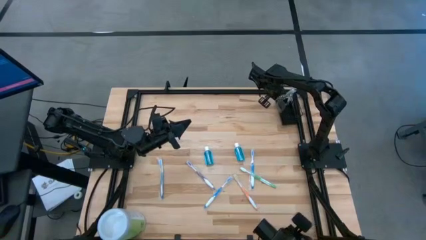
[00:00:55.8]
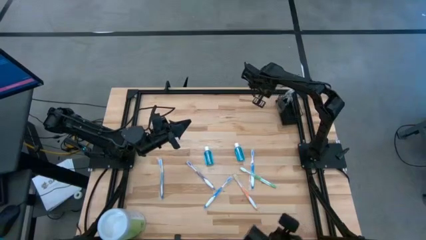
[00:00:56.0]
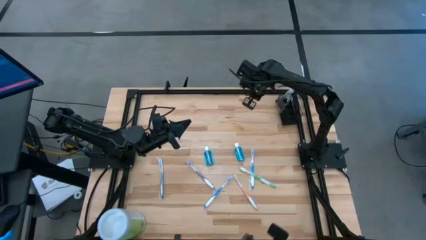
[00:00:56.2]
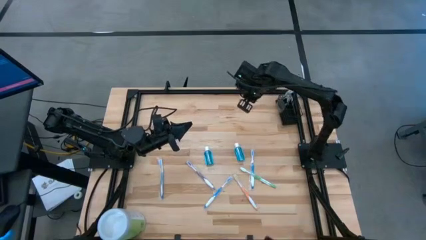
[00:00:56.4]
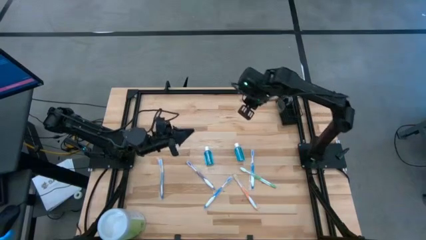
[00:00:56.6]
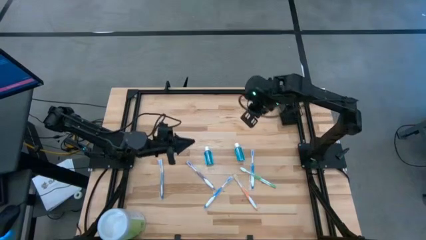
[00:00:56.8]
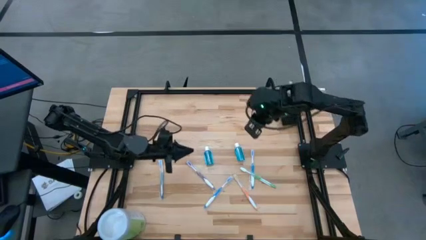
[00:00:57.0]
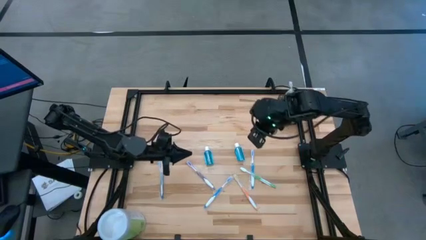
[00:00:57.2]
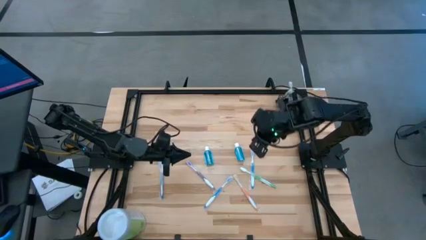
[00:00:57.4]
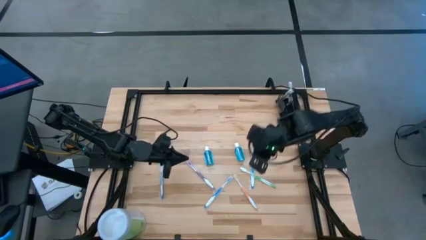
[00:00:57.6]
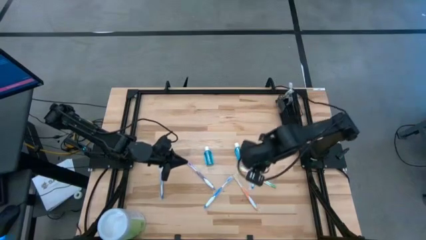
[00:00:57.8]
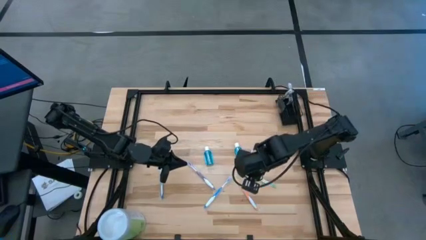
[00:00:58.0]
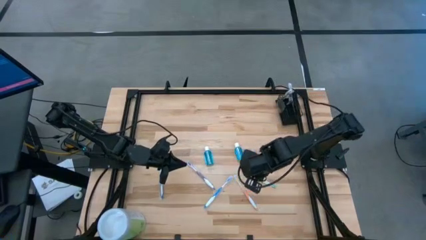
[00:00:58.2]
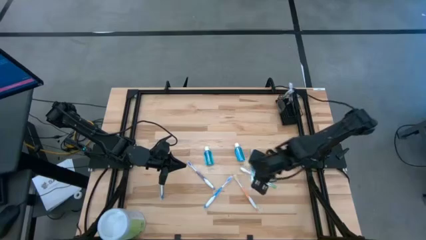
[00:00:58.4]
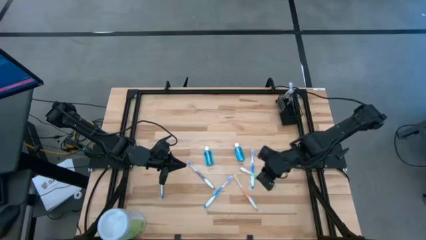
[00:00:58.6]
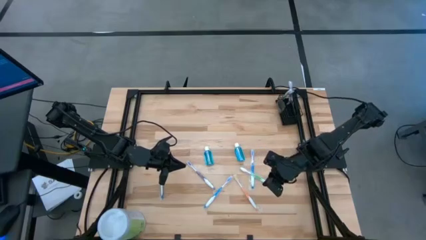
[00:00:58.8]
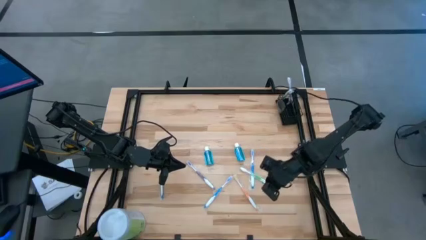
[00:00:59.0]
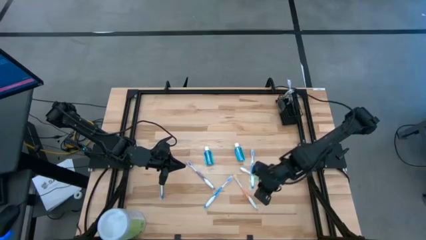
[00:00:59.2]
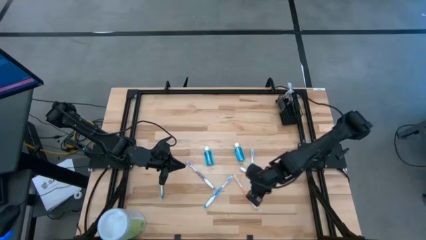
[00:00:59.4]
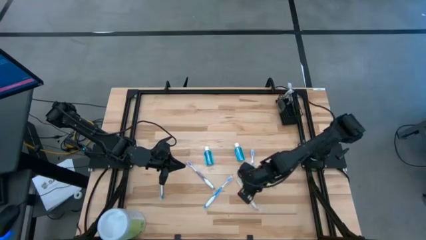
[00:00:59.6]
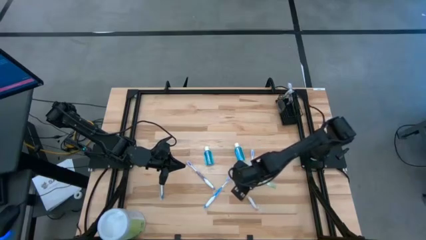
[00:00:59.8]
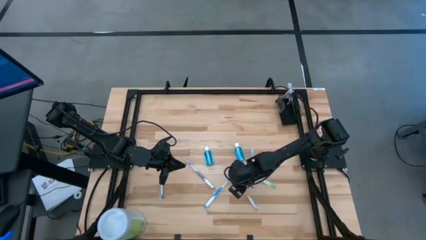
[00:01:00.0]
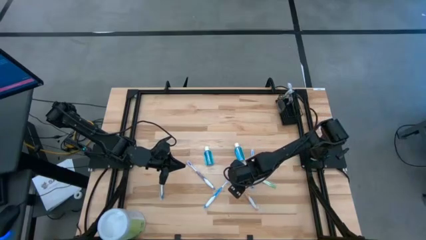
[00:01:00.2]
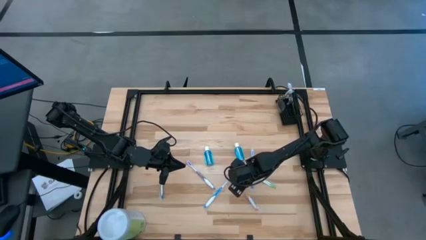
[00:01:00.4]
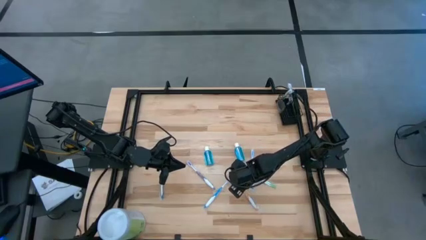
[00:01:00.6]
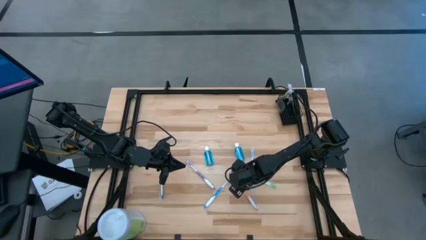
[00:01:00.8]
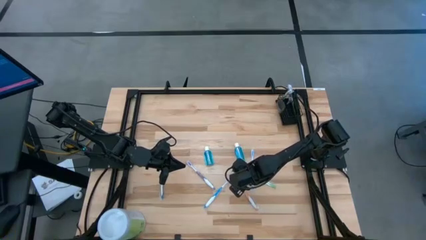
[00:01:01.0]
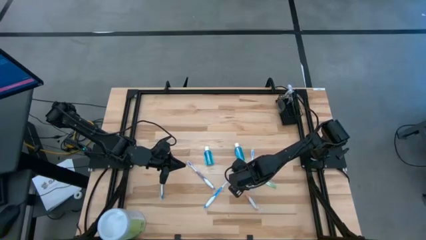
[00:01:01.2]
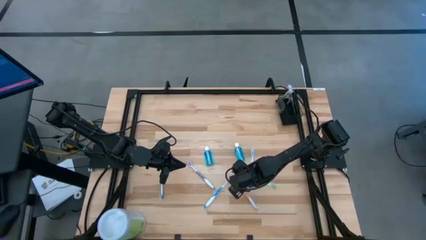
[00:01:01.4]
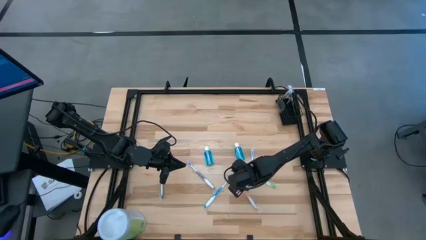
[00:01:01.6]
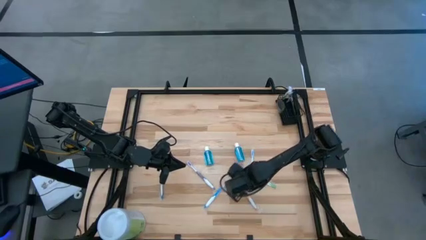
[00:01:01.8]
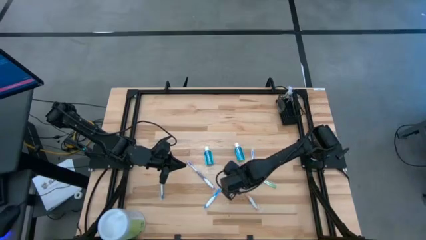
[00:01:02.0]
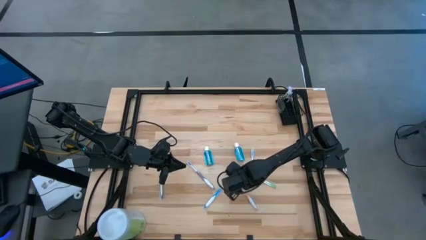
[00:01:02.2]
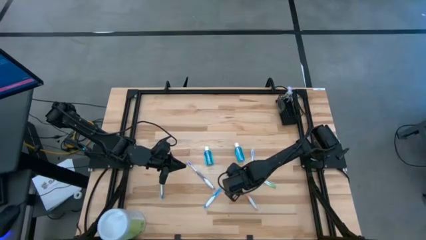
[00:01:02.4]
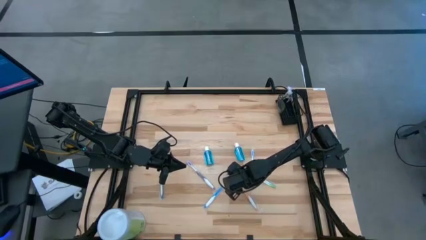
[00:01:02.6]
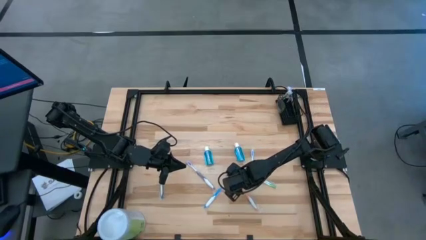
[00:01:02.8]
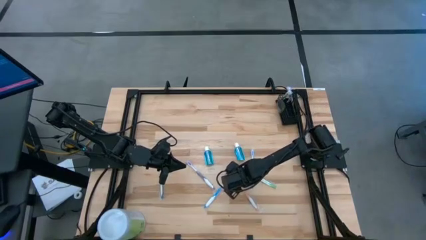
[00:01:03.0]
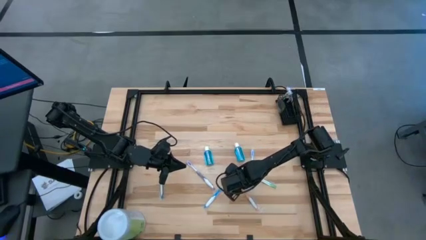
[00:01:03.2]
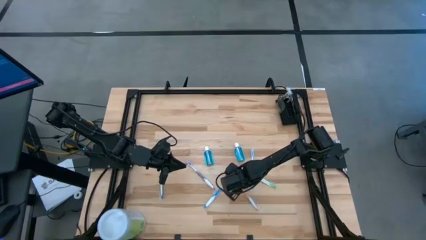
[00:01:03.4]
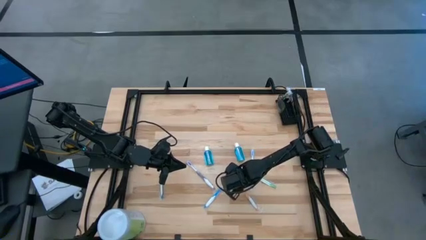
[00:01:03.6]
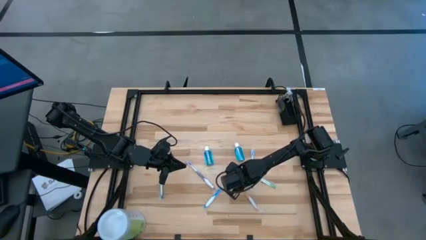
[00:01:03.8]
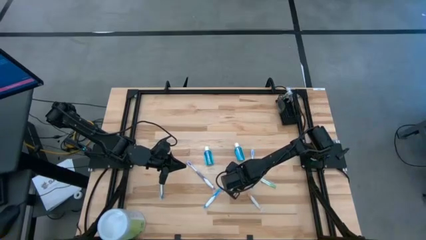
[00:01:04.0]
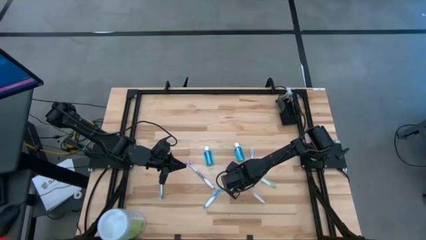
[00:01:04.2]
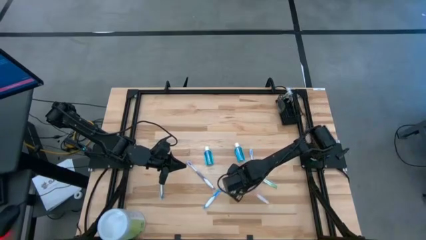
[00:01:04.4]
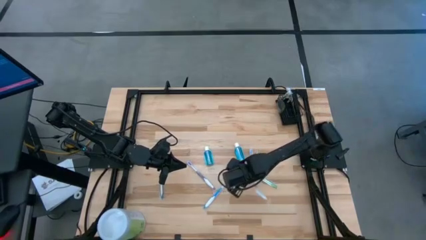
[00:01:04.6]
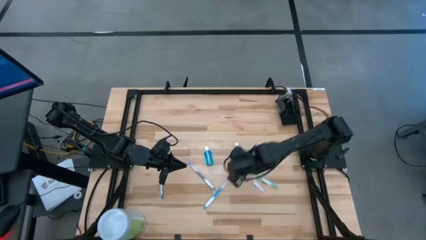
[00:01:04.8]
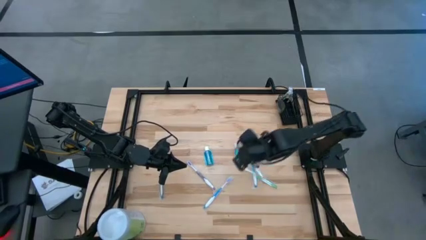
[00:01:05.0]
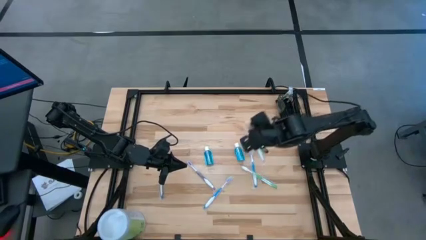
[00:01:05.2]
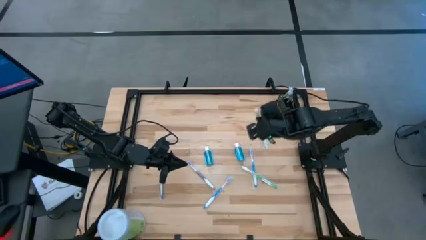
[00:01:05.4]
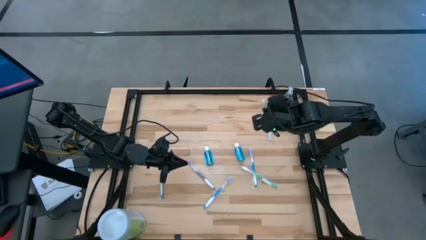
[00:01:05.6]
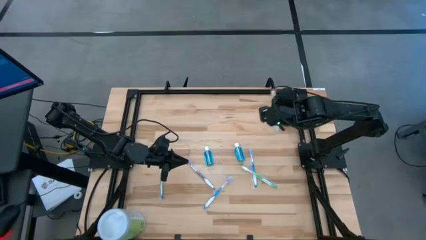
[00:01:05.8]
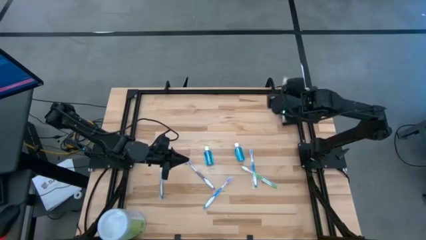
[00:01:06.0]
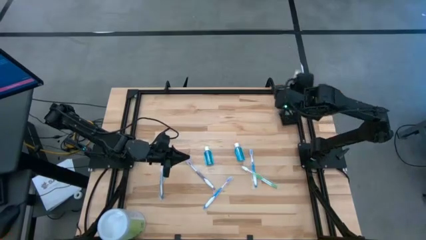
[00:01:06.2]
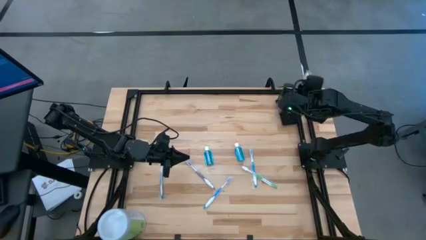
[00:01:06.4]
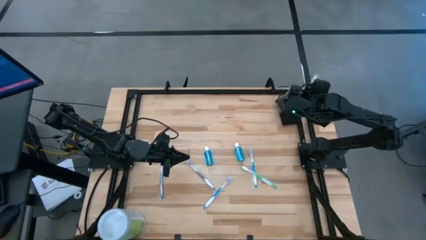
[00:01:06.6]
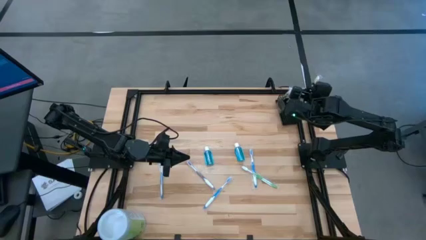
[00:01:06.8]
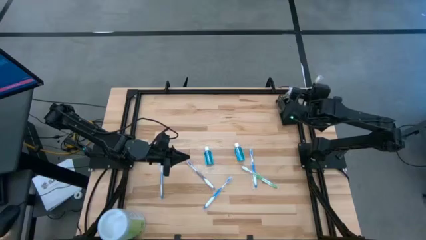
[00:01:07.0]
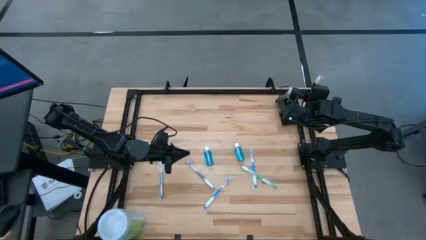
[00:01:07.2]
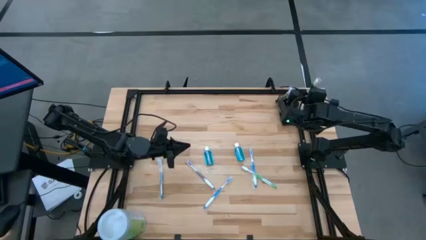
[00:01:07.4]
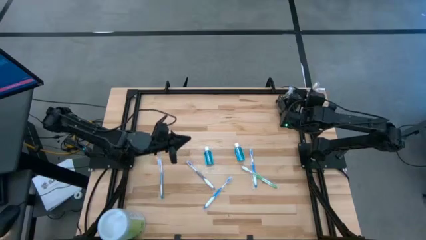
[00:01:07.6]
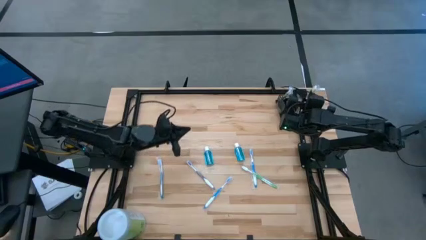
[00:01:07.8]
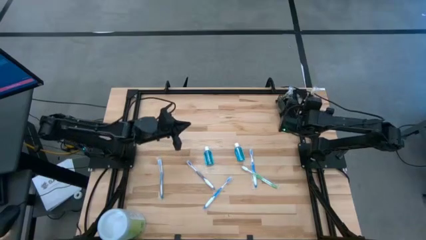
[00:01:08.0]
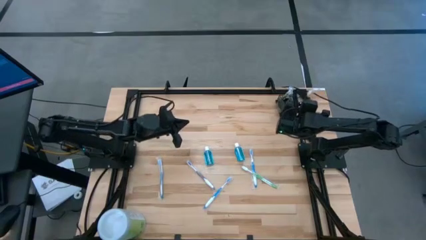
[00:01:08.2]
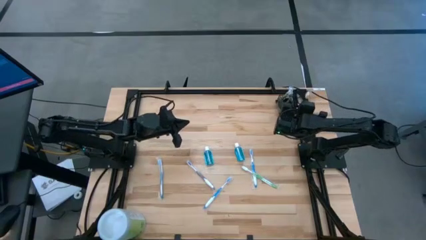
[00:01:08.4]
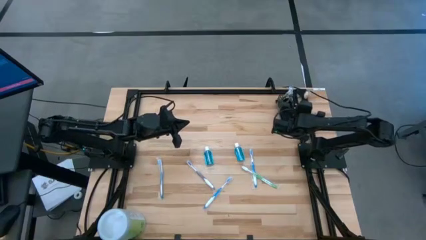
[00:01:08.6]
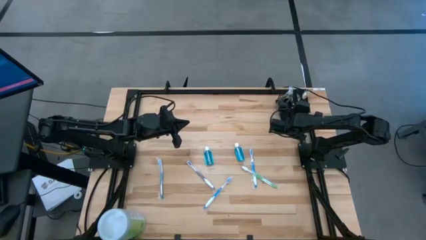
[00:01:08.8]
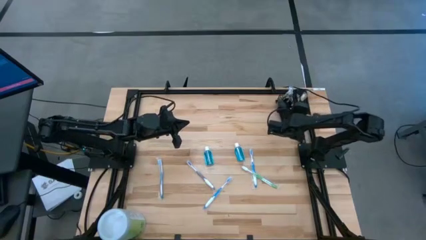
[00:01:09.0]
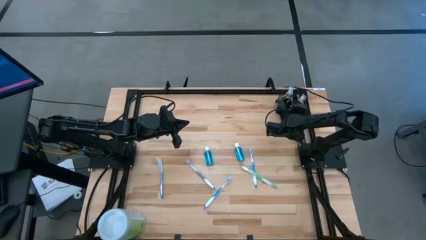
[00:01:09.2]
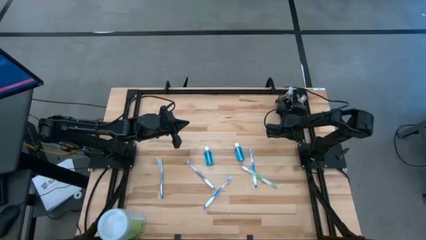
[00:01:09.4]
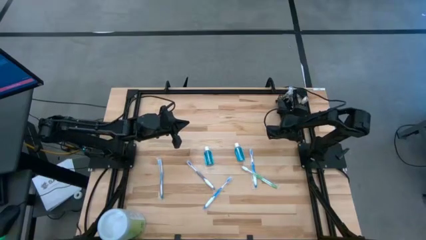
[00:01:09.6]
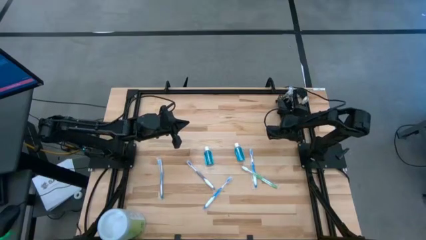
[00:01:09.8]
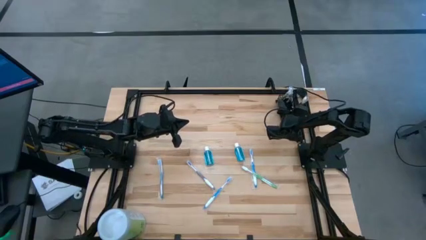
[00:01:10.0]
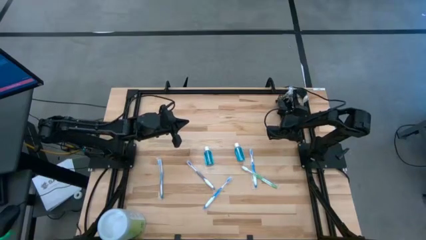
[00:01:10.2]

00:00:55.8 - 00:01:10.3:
Task: Pick & Place toothbrushing station
Put the orange toothbrush into the right section of wire organizer
